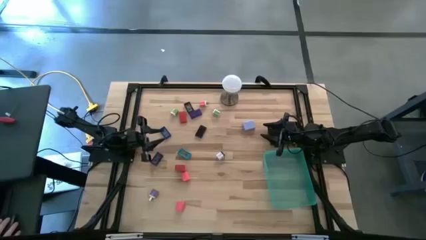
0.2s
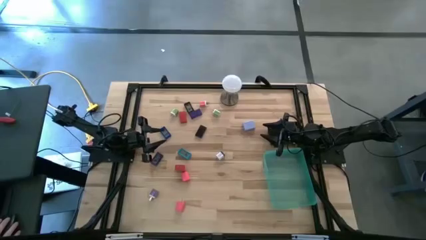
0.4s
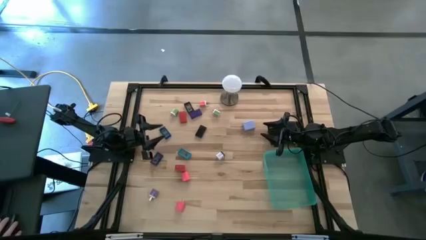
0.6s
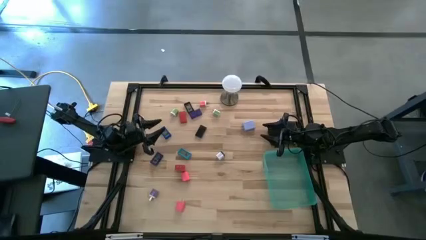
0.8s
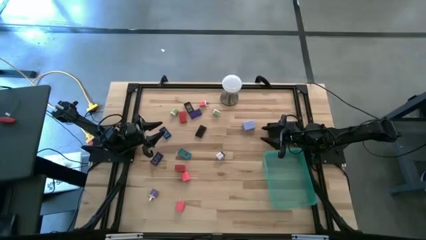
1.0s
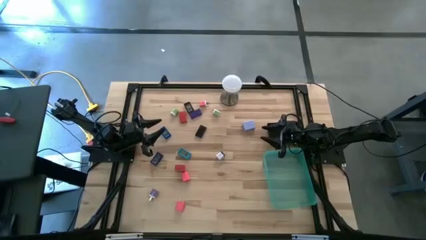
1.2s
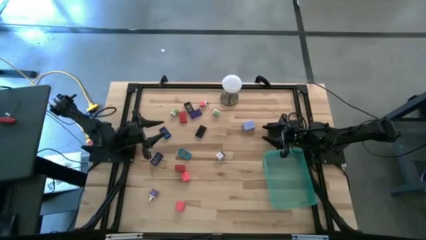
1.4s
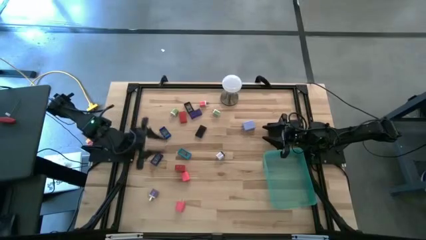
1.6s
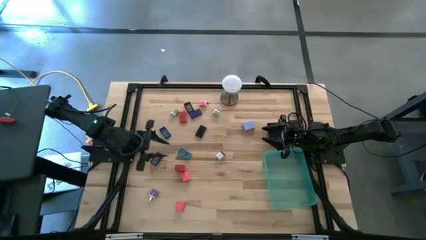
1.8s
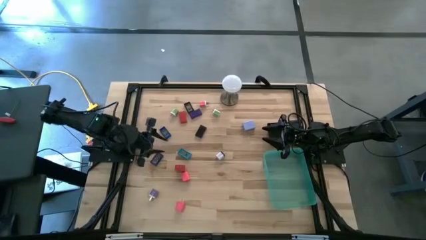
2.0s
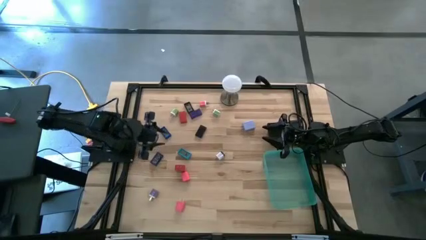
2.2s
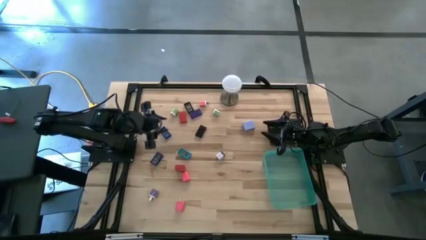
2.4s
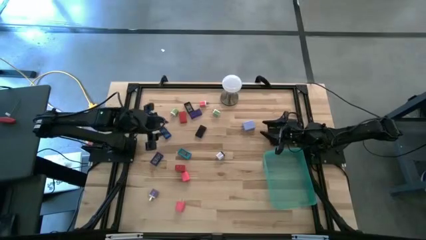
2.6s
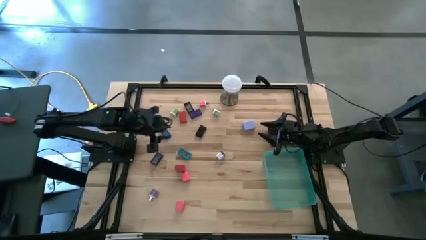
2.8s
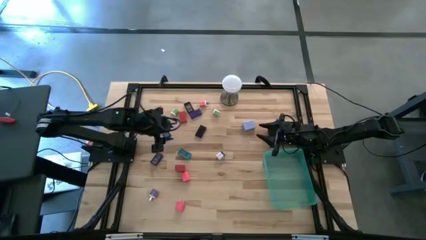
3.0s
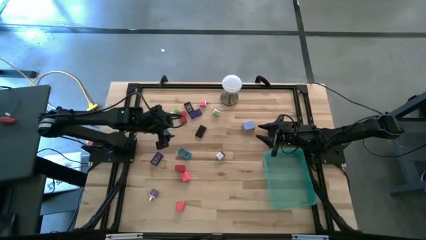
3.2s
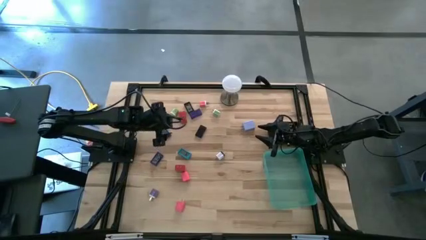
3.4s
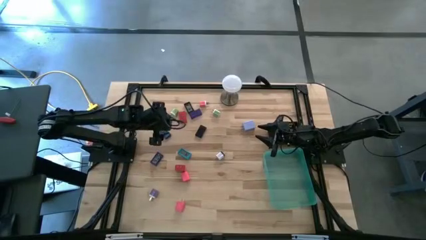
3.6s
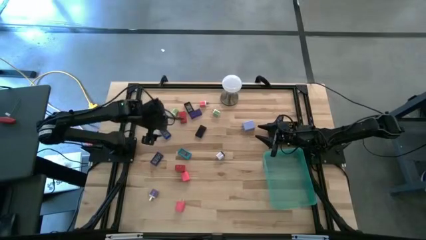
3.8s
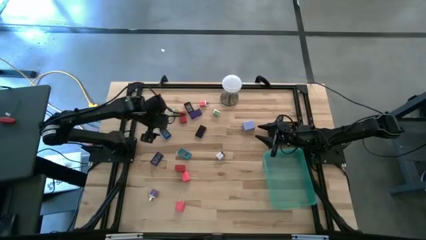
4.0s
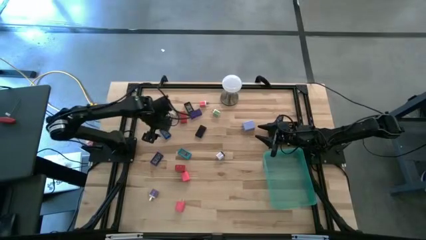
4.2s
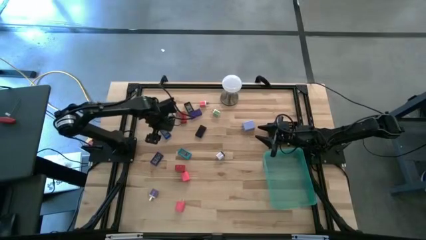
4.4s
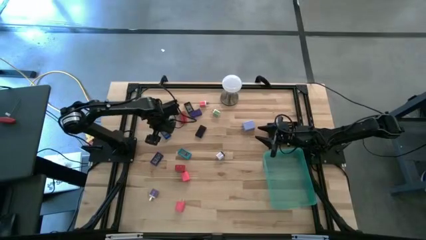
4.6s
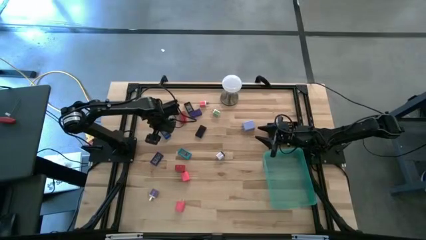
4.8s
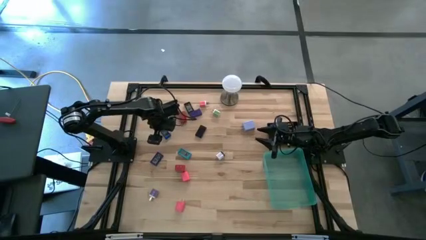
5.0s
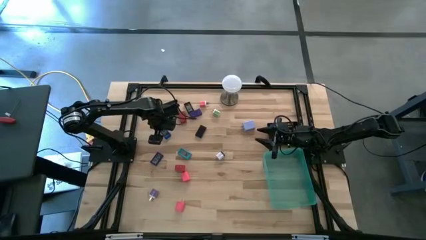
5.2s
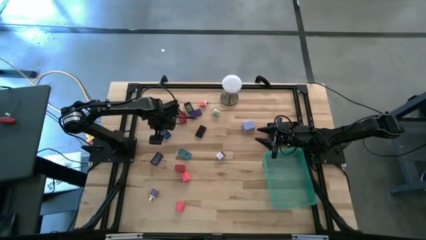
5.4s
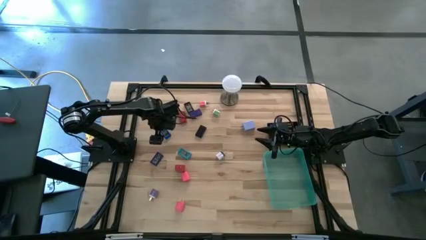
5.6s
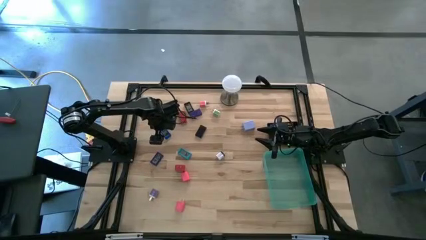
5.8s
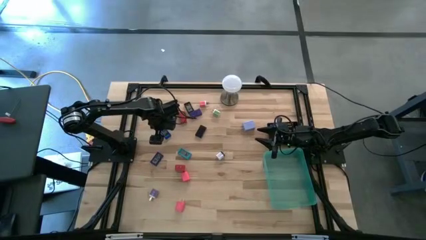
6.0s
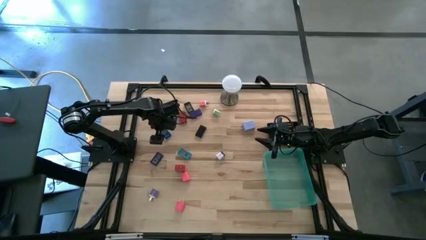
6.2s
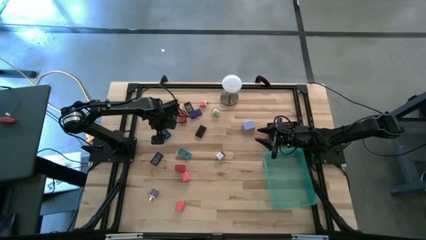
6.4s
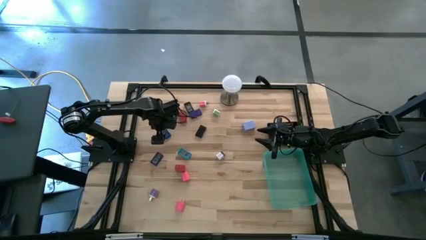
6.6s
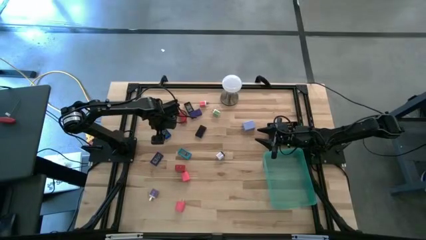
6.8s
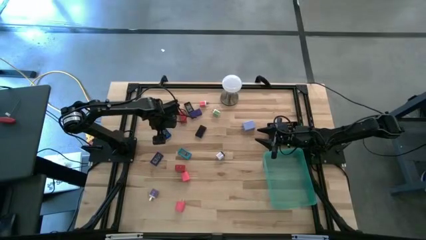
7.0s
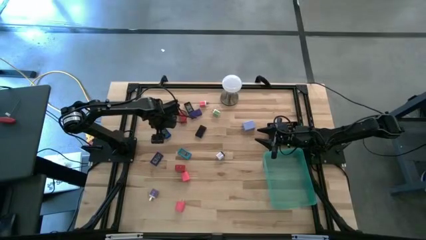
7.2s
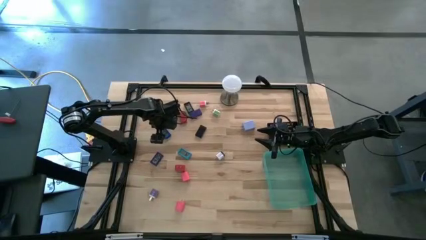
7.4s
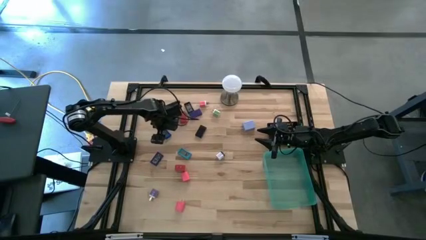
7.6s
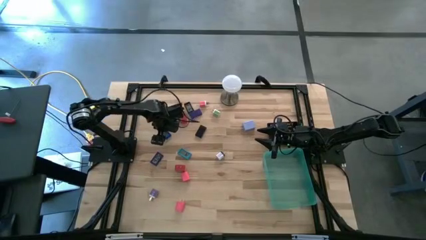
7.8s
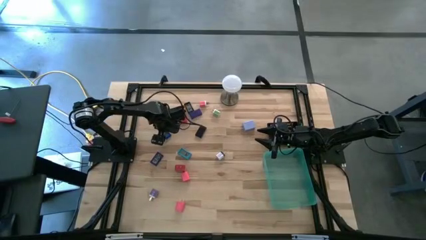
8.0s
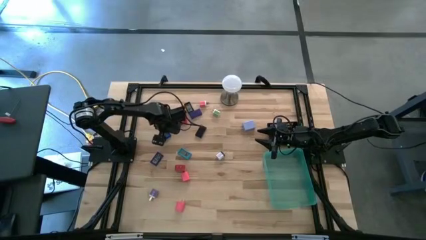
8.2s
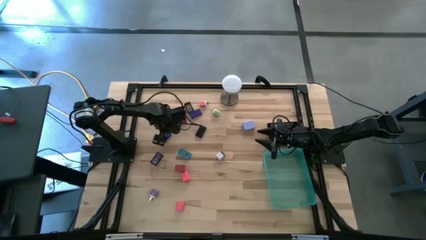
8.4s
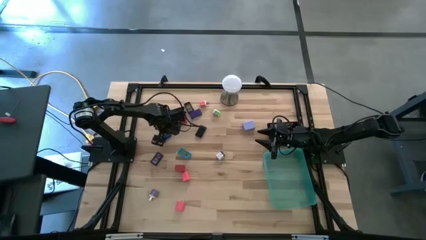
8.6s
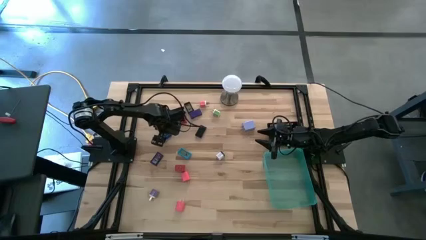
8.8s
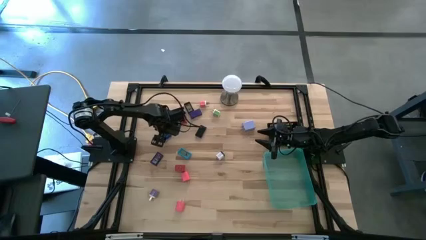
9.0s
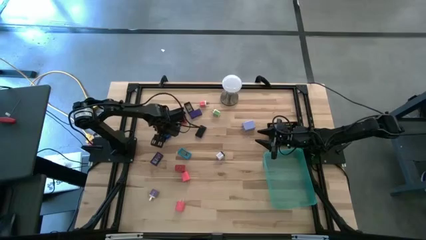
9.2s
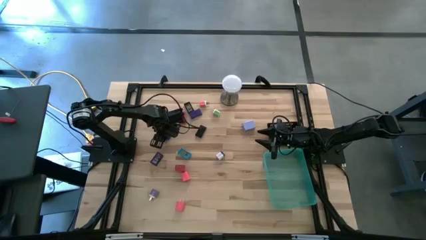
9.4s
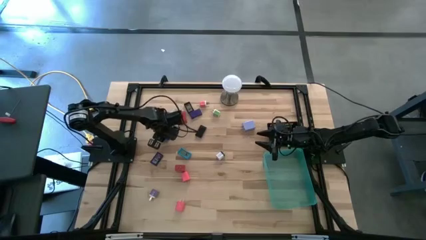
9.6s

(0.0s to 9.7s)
Task: Pick & Place Office items
Put the blue digital clock into the black basket

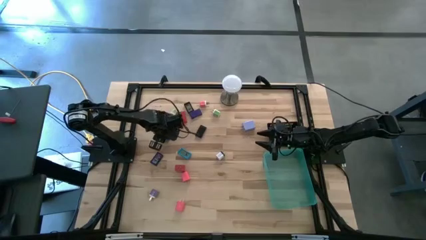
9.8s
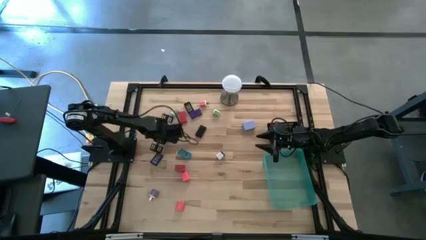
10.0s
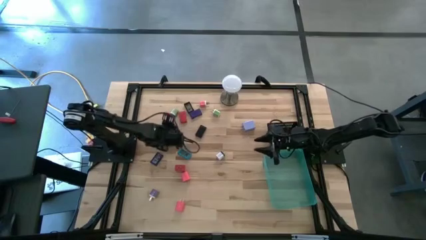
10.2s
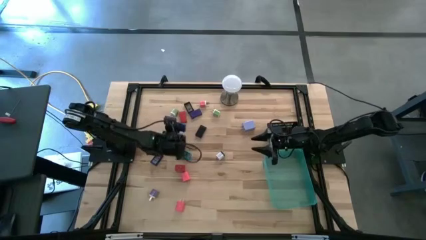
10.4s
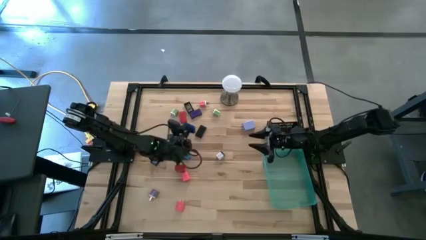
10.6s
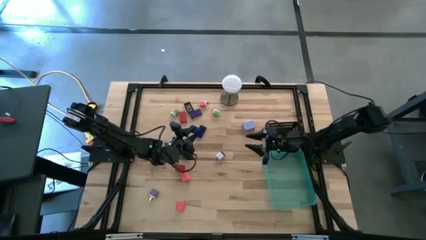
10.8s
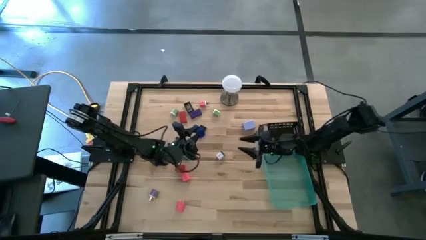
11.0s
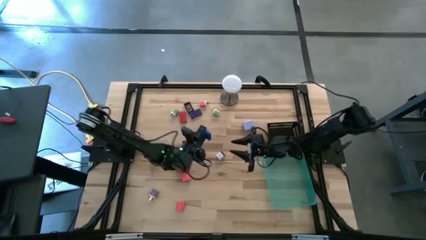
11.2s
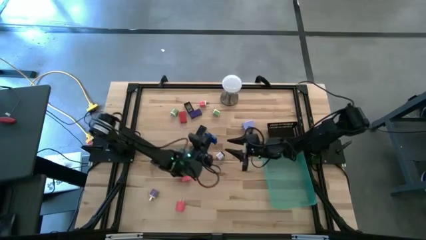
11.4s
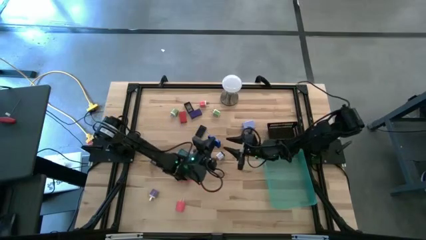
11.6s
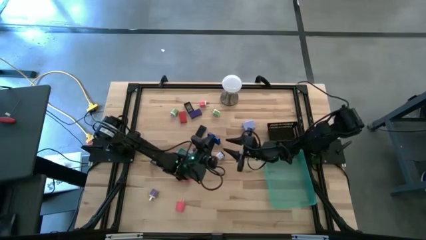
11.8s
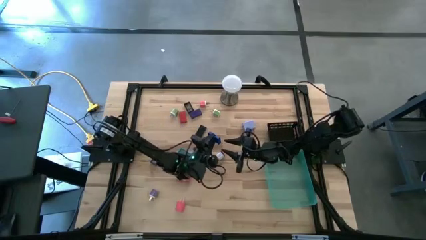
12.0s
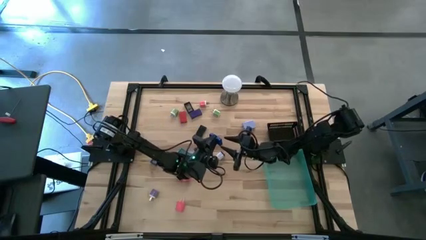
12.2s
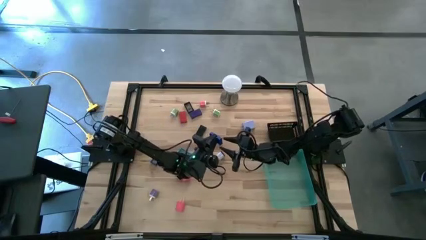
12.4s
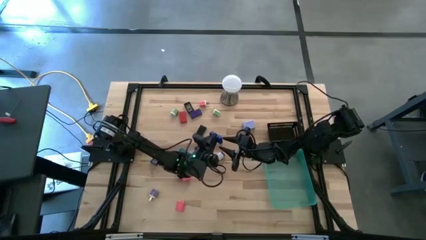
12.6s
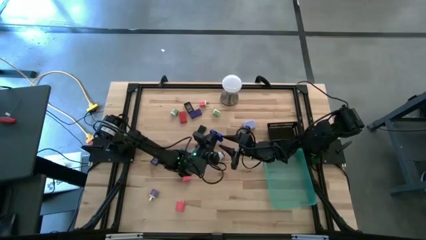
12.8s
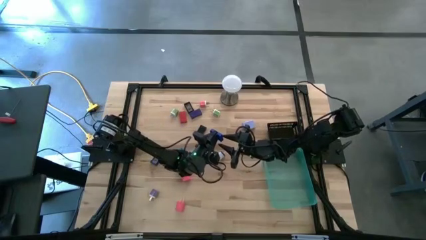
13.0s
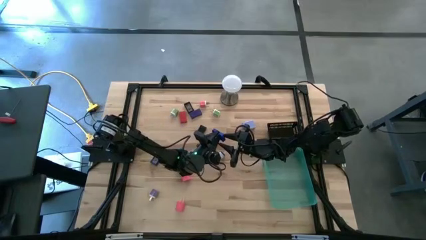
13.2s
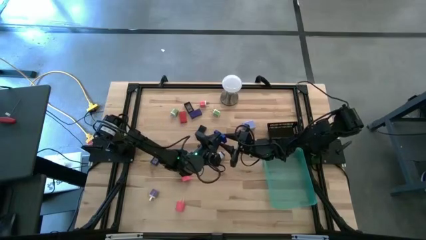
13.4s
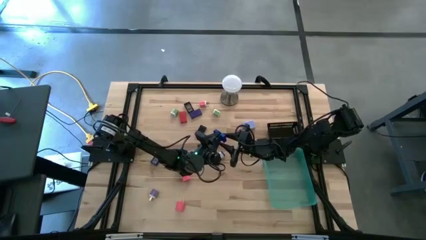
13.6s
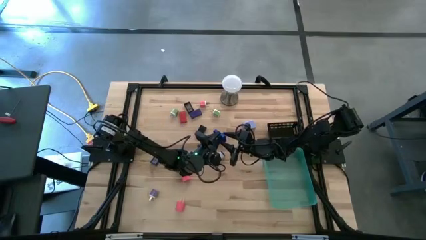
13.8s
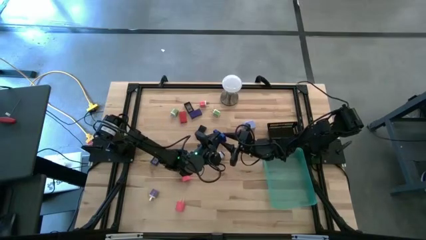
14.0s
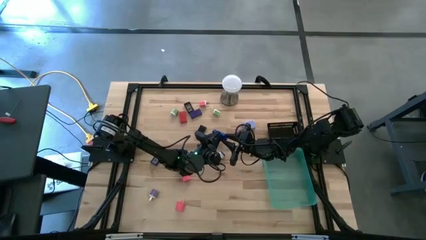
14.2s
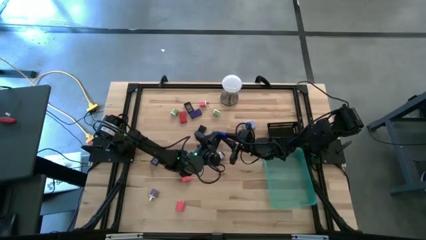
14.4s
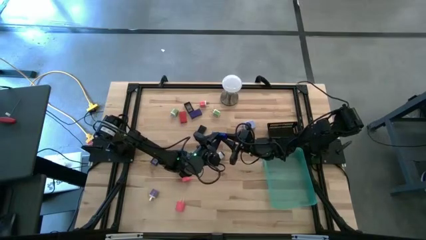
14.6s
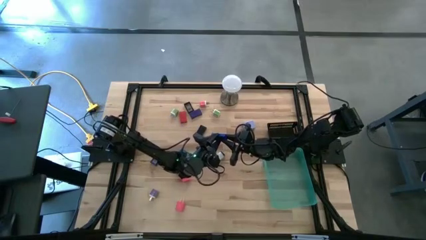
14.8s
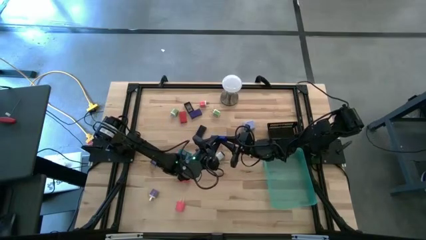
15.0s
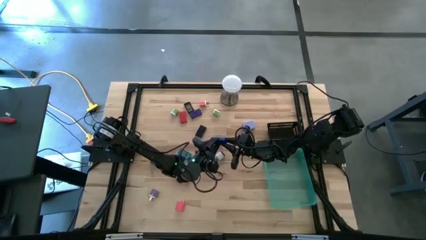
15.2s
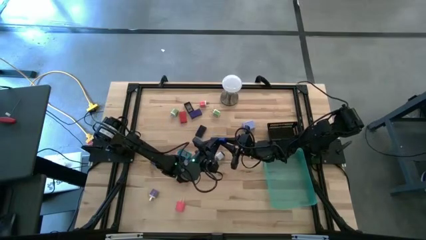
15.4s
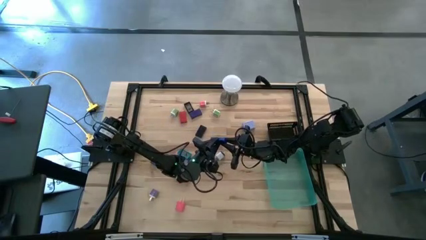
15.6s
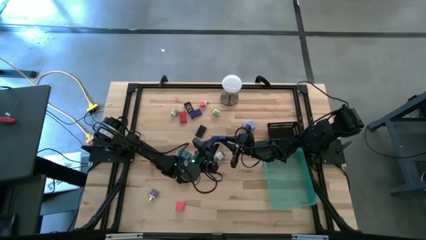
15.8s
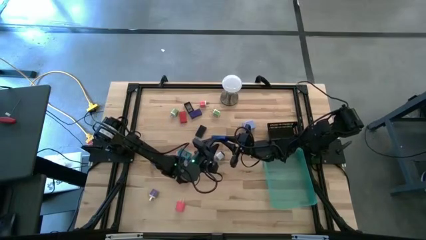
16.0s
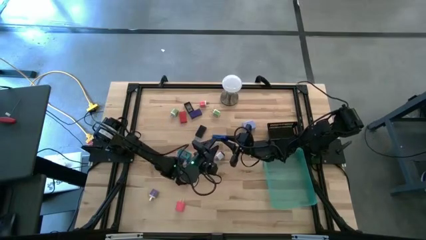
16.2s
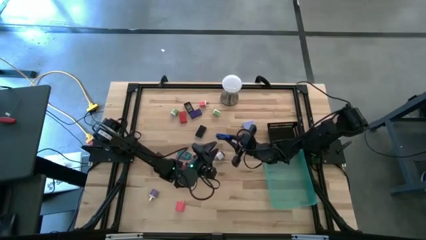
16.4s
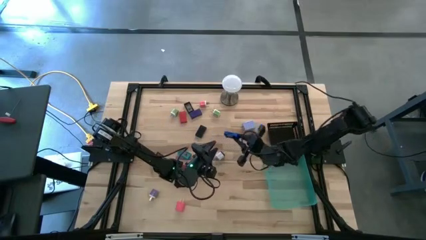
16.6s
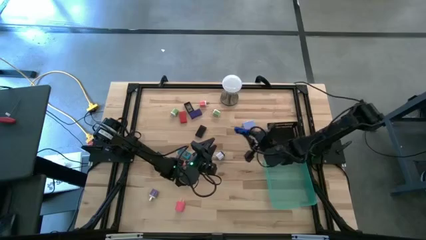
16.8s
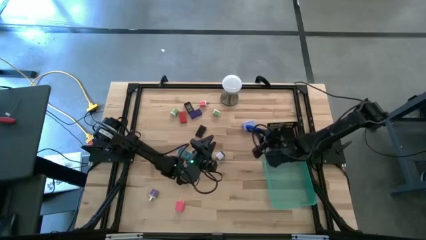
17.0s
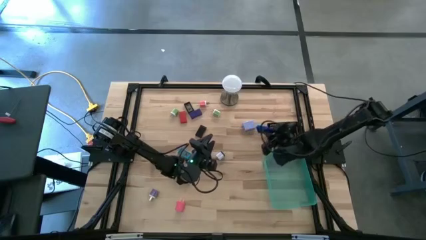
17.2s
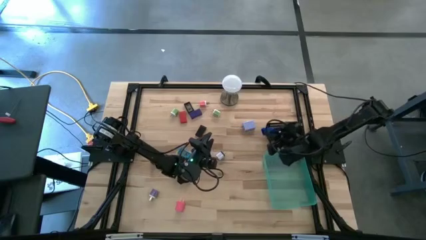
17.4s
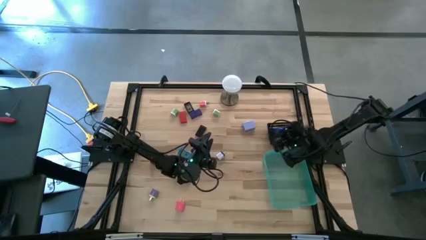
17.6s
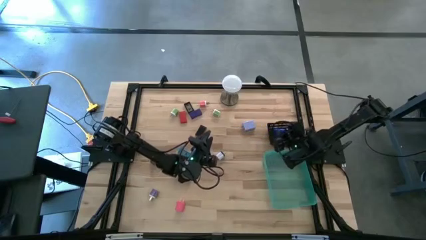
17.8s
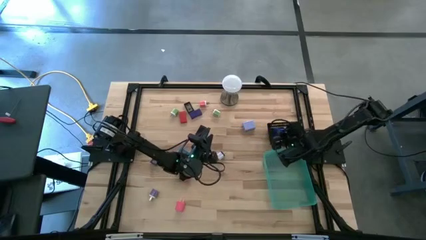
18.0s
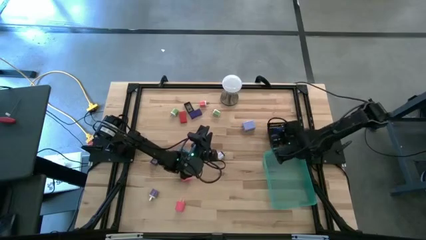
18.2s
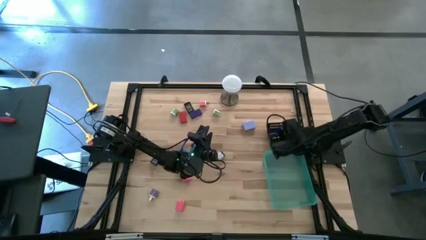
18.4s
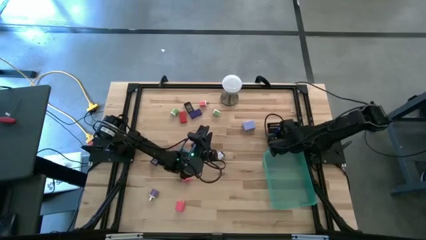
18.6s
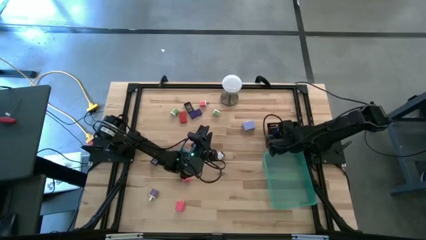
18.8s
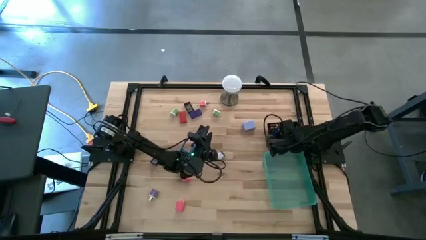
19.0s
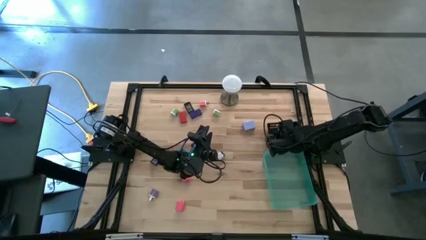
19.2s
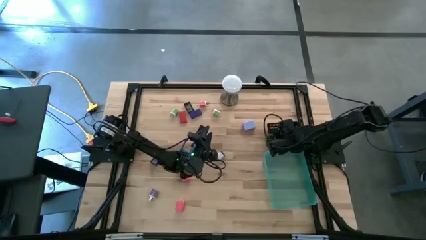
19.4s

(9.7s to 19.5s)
Put the blue digital clock into the black basket
